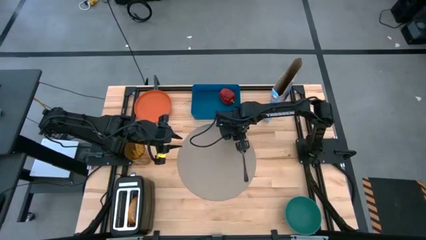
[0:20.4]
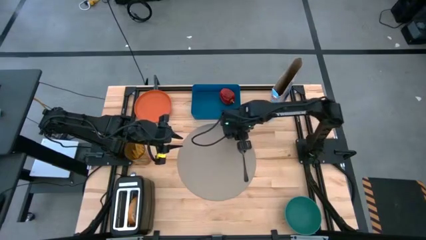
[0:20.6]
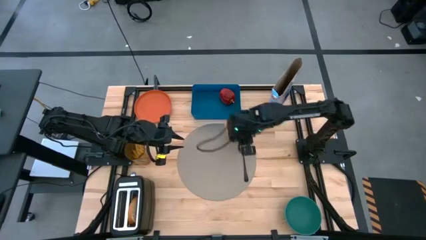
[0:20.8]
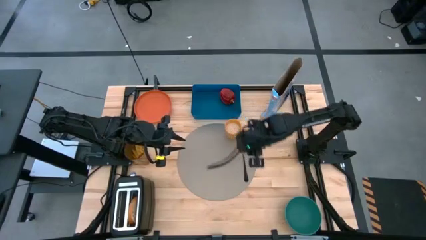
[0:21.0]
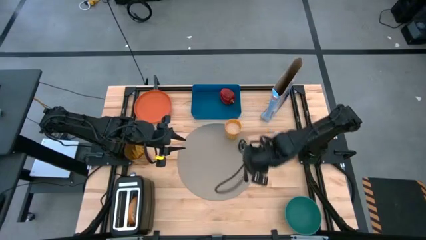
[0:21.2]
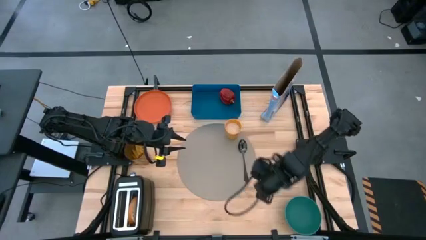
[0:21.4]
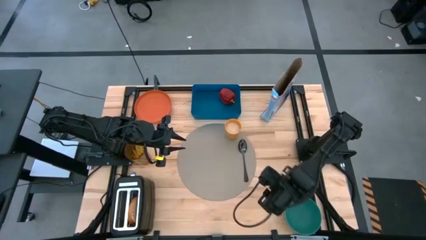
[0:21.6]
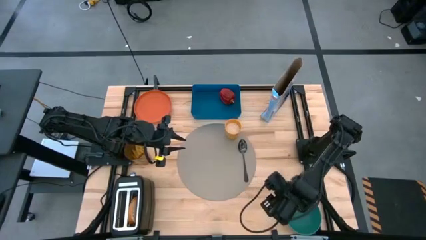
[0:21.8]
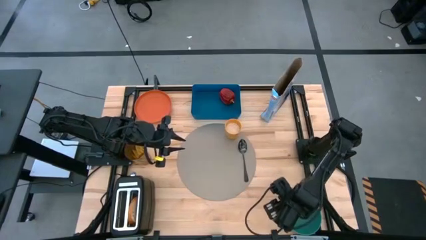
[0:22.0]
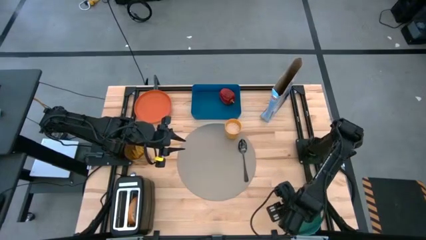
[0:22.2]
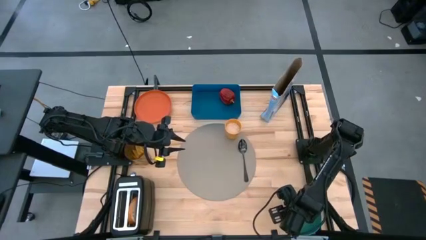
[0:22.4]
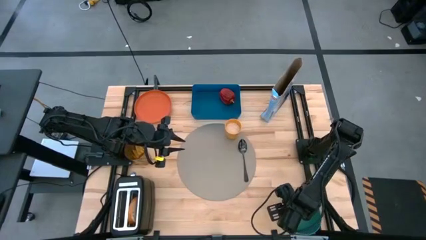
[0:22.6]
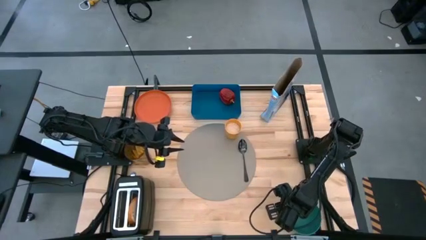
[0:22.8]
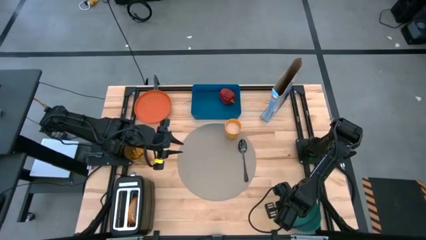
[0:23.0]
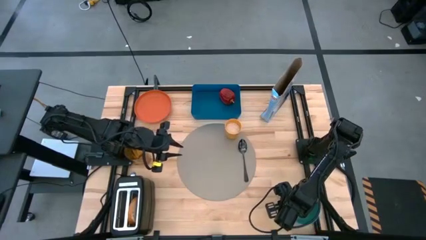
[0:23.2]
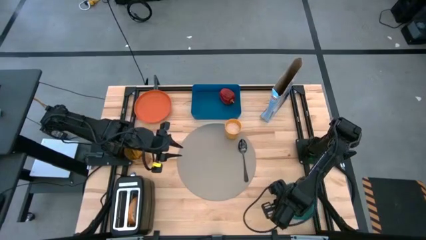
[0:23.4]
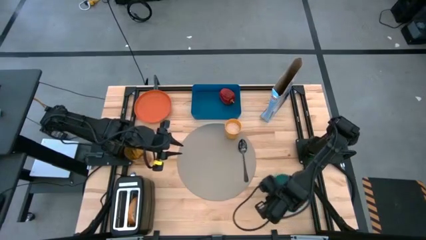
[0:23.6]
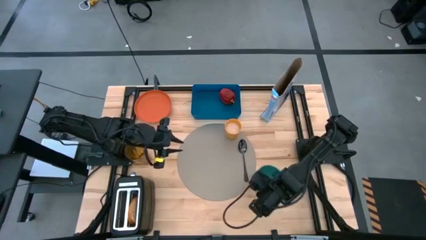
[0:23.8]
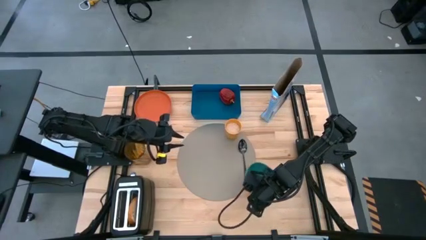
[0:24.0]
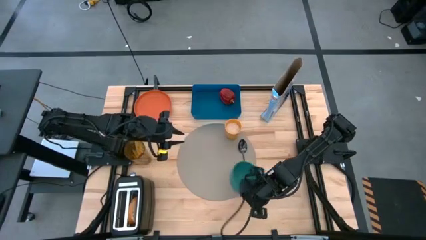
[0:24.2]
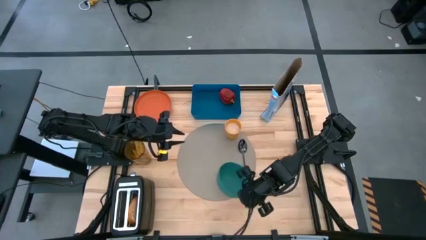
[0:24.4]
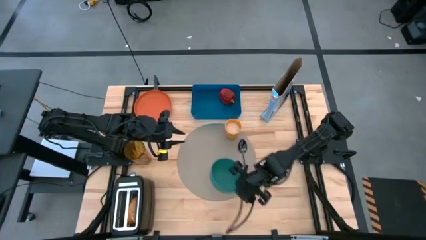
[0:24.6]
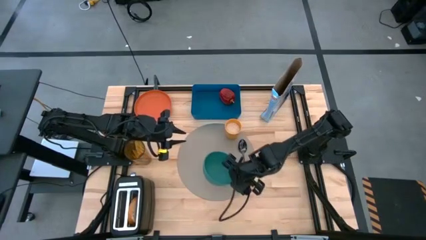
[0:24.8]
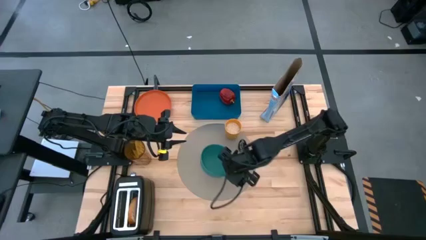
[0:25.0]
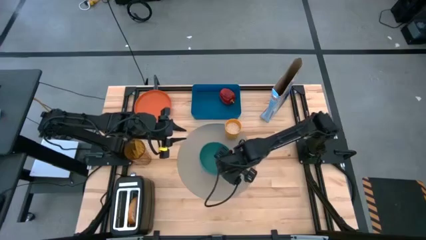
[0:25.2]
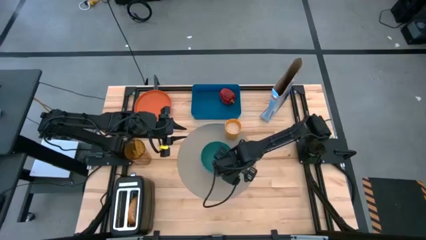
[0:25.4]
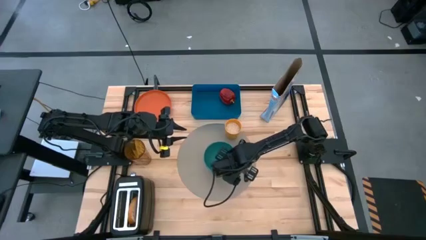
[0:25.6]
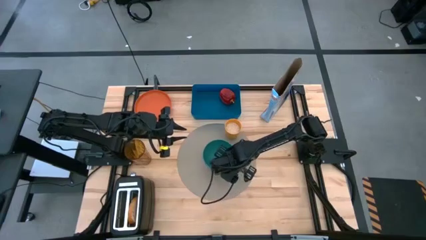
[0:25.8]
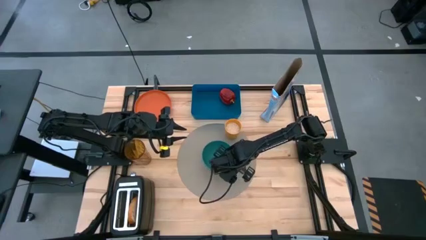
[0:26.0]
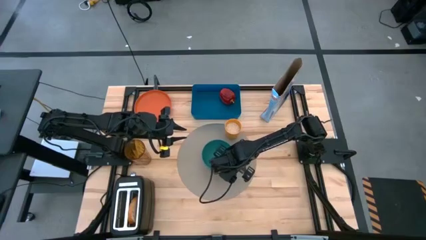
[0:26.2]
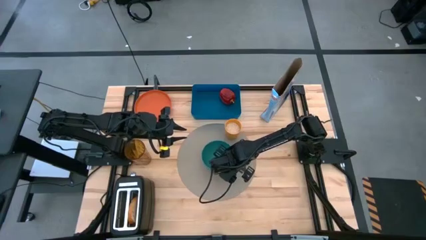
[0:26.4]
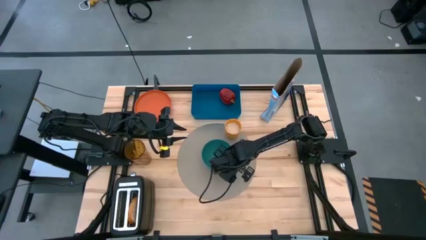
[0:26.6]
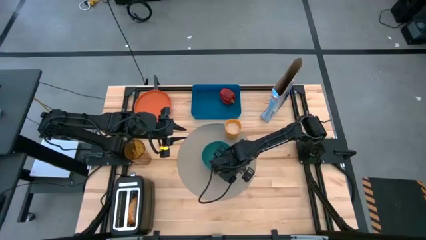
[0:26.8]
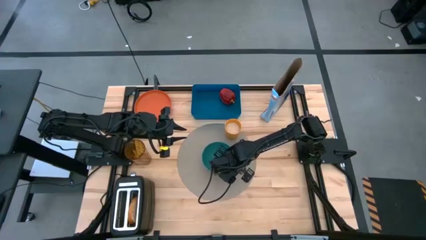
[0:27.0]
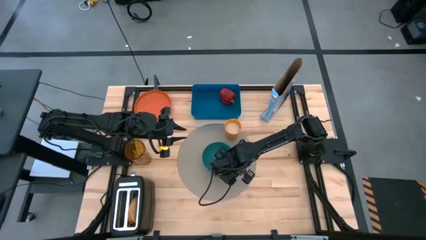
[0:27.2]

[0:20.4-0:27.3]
Task: Arrange a breakfast setting
Put the green bowl on the center of the gray table mat

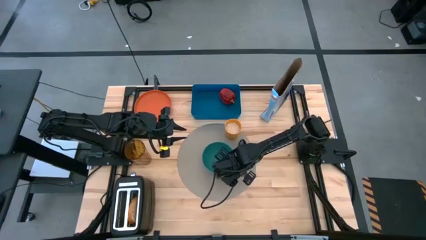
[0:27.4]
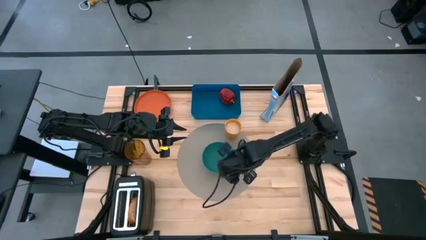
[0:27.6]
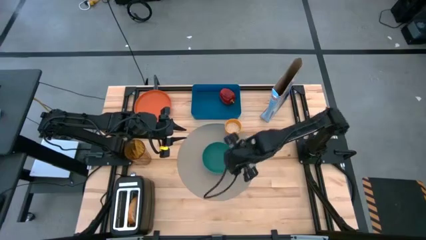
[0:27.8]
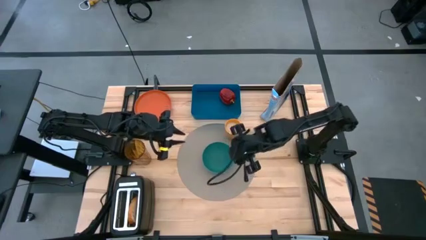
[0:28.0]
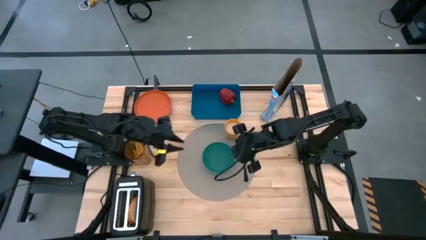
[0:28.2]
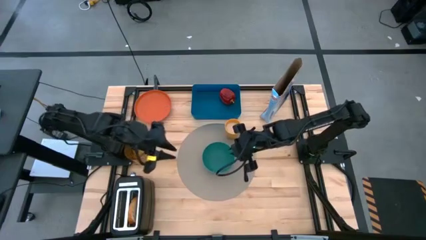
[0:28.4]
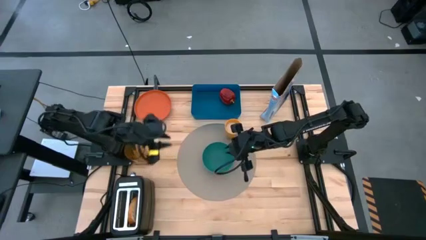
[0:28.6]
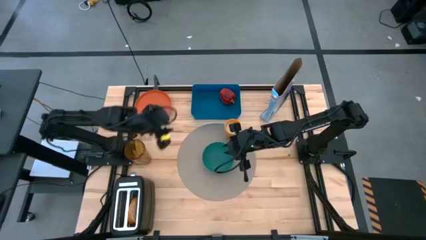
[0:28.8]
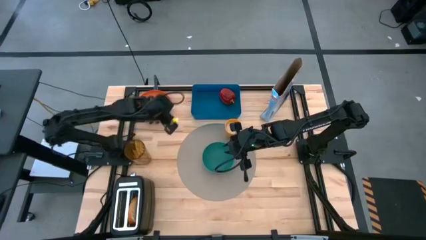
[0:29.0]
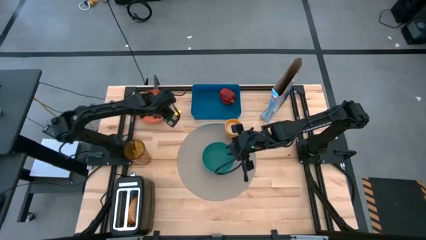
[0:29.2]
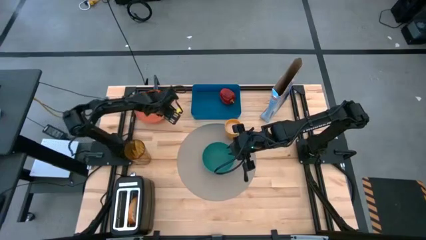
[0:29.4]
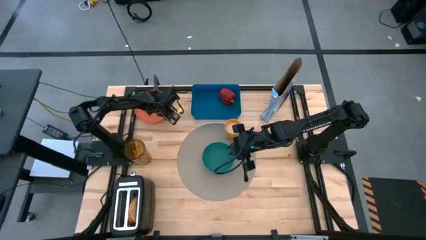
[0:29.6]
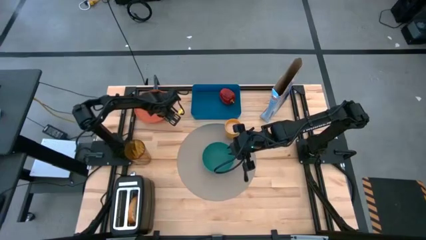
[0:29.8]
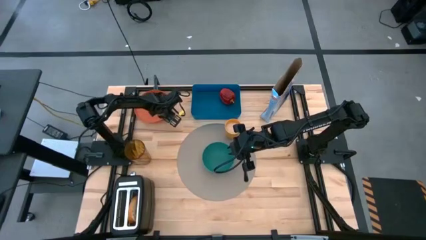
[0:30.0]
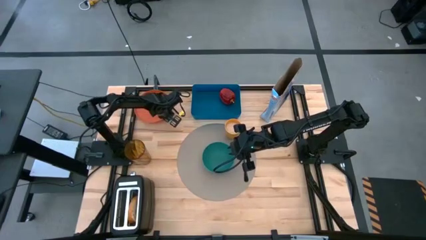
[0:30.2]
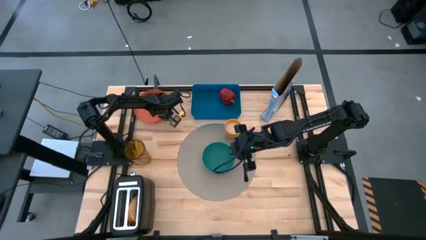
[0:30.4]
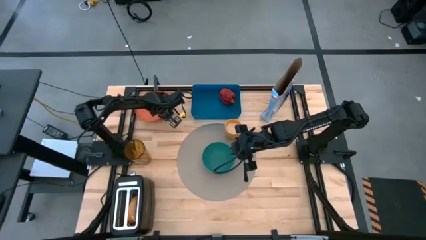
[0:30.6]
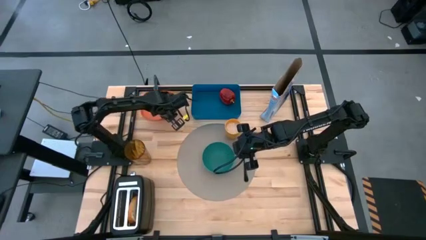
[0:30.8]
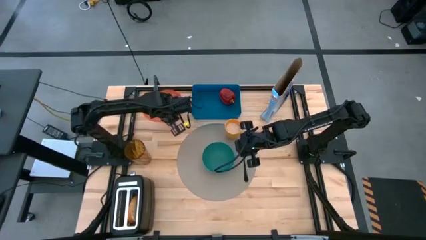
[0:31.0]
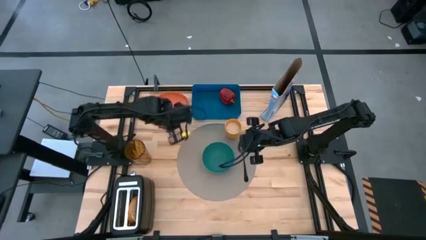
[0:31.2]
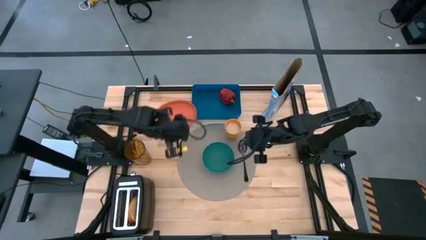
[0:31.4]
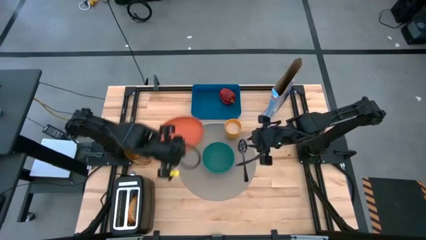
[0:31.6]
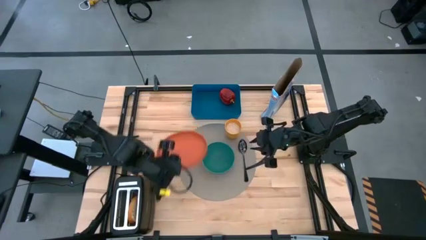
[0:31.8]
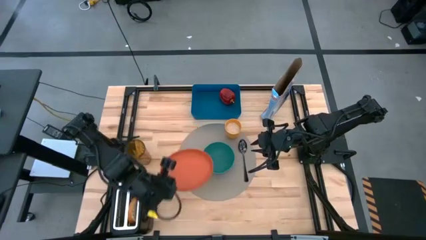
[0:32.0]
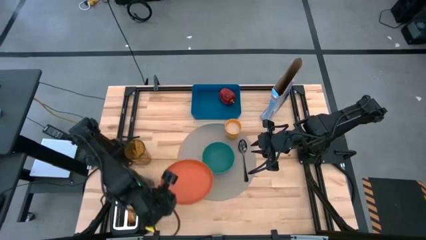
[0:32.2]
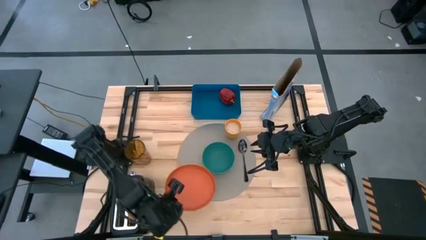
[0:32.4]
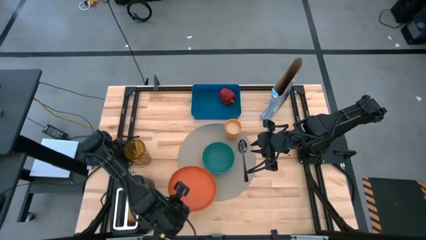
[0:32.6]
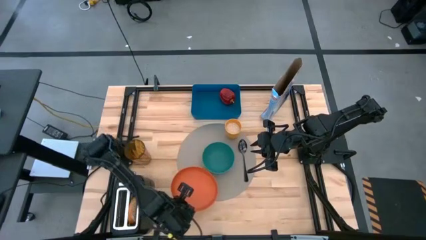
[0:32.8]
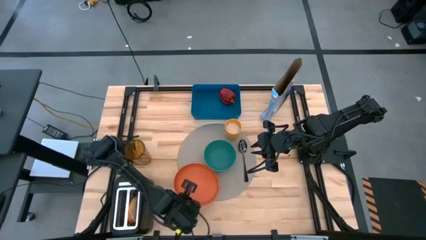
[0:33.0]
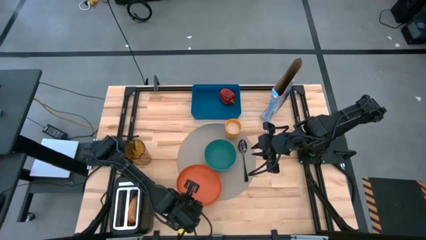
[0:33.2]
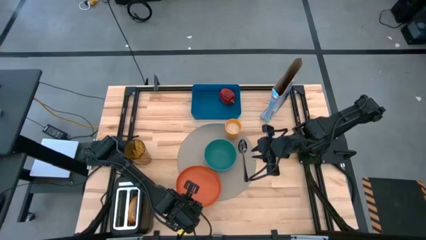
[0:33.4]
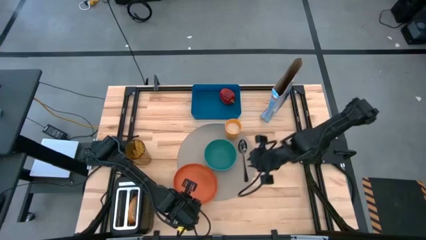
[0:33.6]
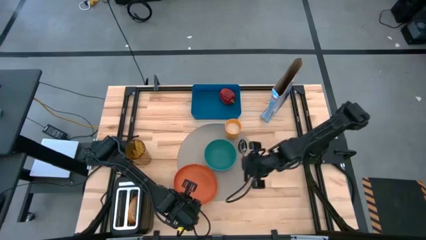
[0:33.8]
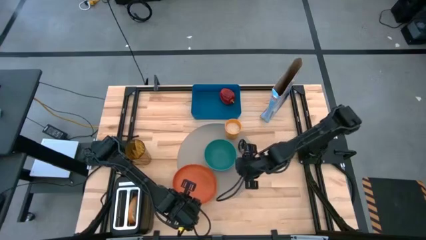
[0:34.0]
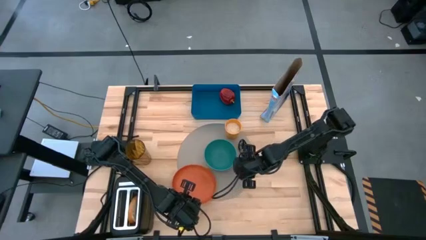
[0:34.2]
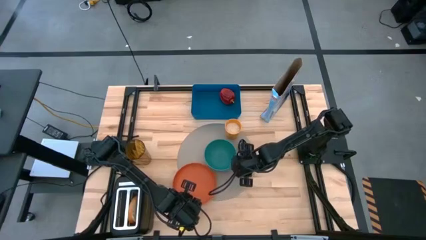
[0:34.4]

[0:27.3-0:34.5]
Put the orange plate on the bottom left of the gray table mat

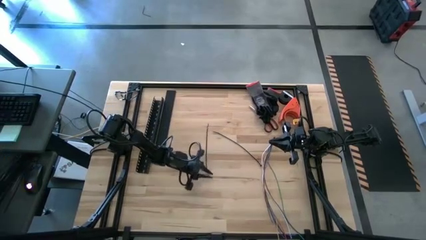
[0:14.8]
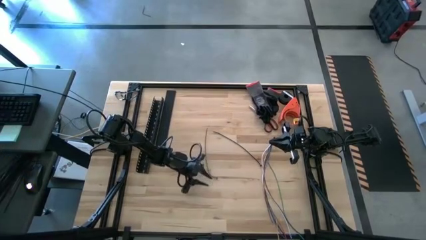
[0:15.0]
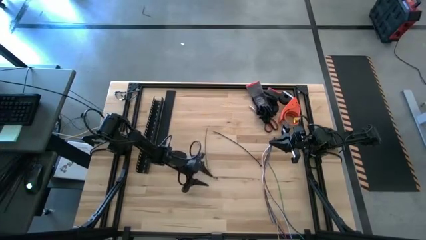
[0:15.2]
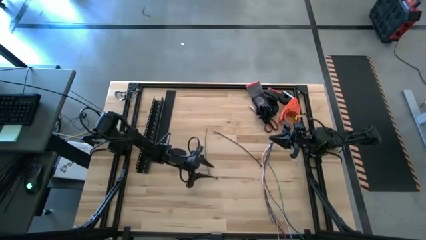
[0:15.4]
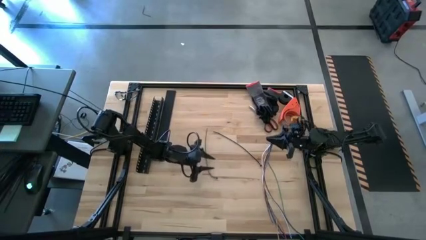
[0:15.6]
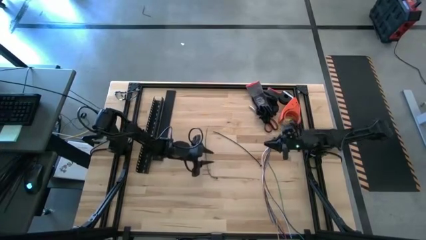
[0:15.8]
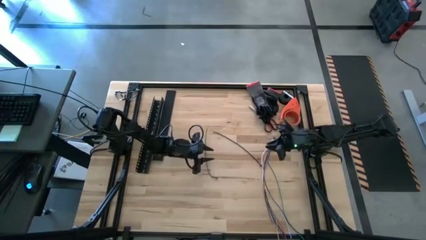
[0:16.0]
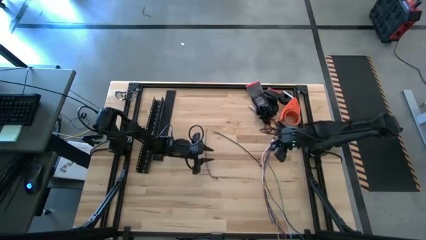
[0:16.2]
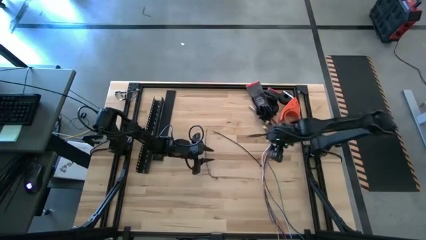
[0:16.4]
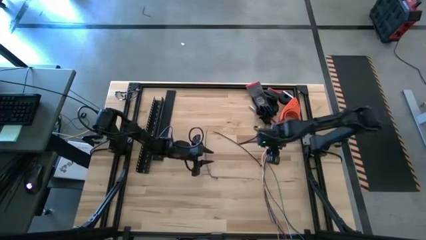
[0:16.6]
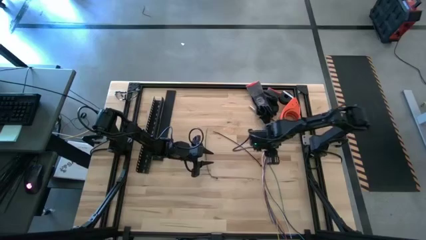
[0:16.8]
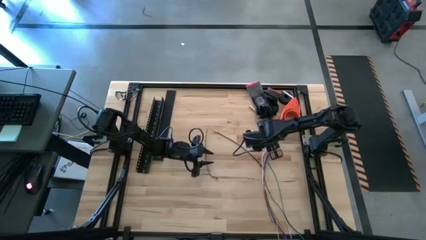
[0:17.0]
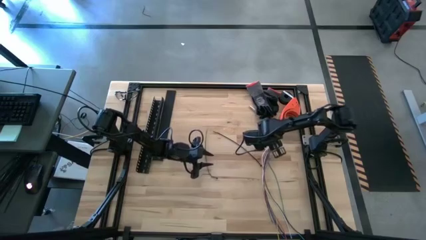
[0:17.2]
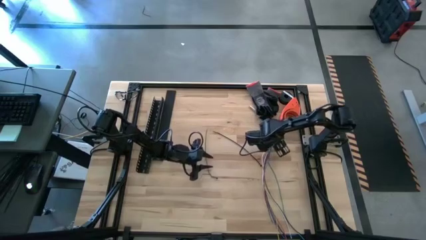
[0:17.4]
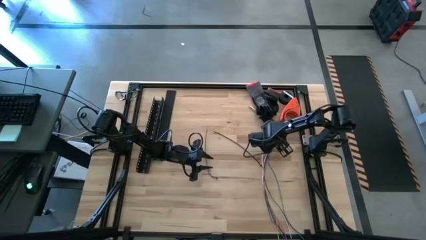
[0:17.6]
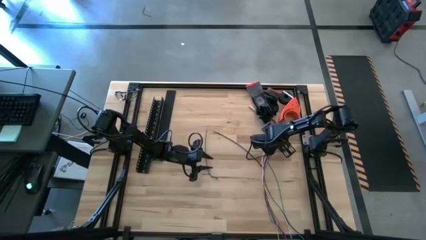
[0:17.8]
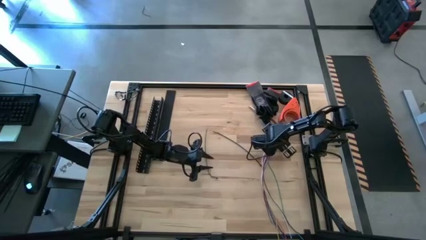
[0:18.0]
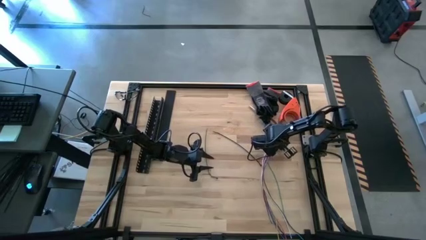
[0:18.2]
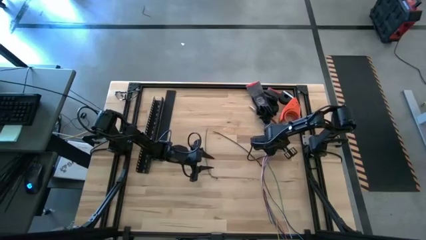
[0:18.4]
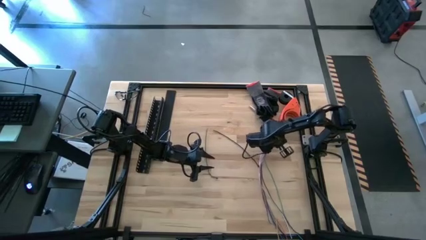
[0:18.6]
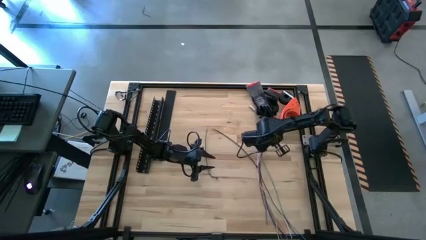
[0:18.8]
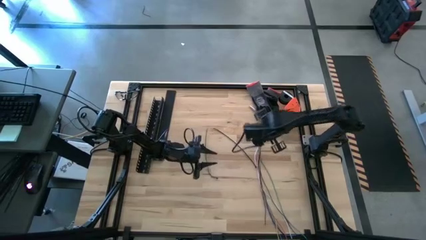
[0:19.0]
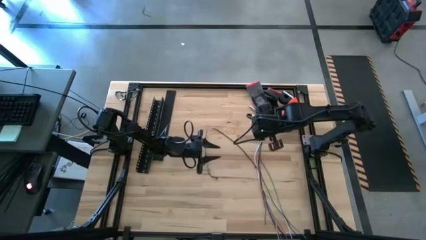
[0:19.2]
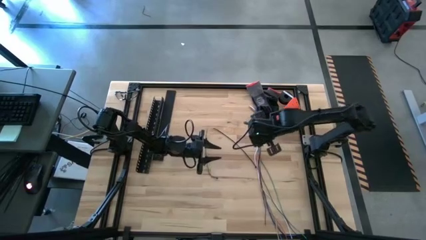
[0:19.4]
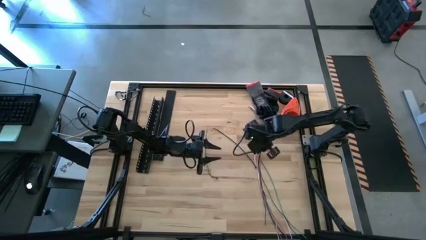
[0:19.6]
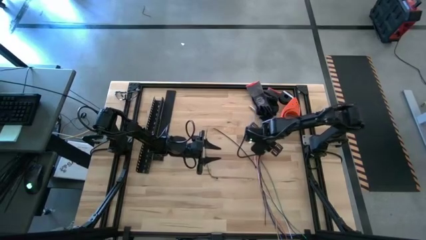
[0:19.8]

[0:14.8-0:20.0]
Task: Ziptie cables
Wrap the cables together using the left black zip tie
